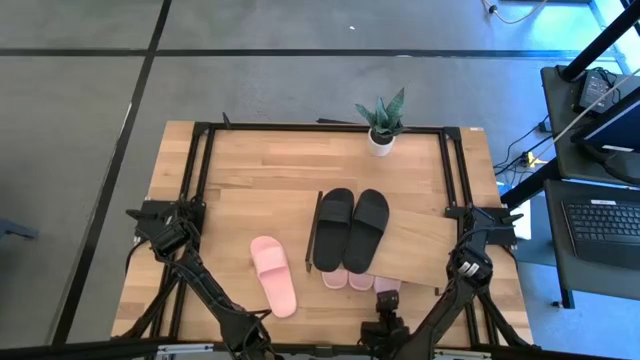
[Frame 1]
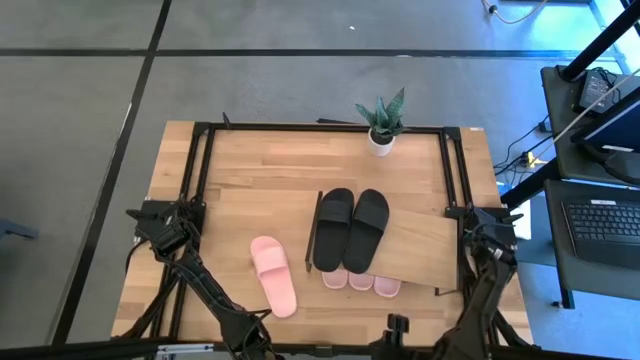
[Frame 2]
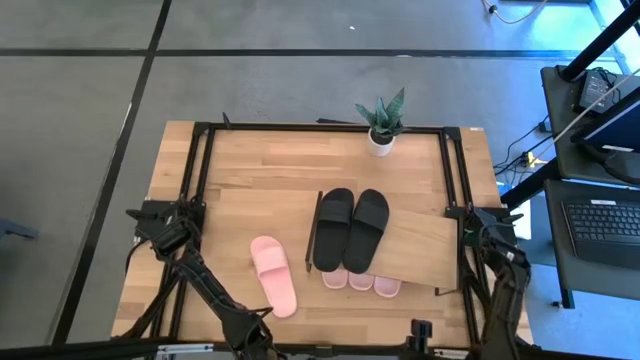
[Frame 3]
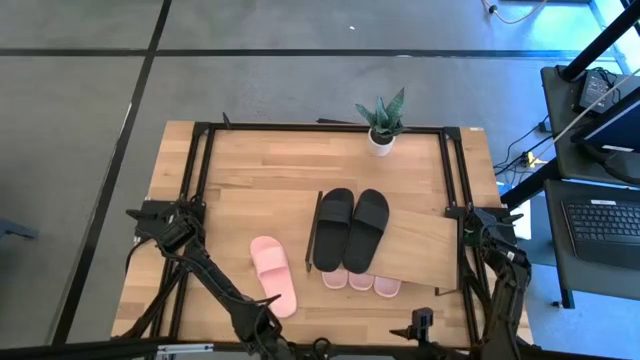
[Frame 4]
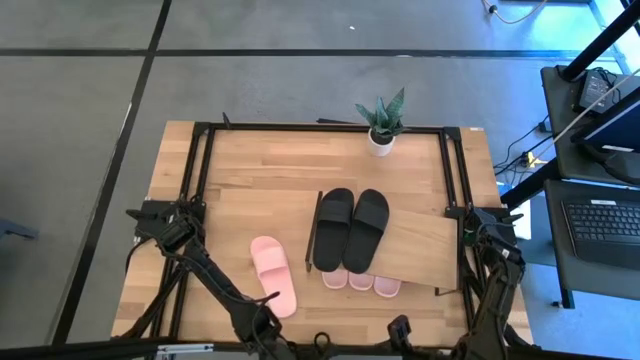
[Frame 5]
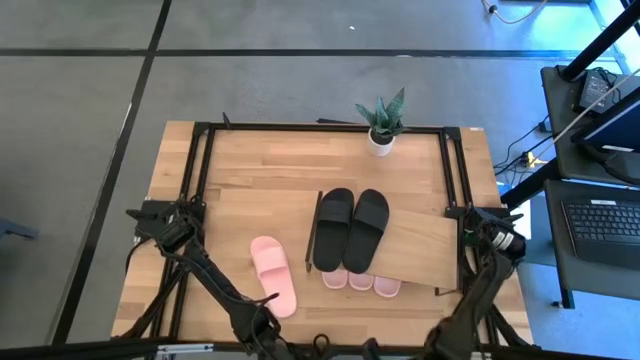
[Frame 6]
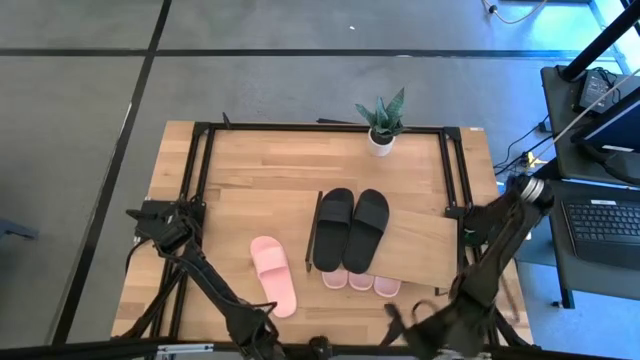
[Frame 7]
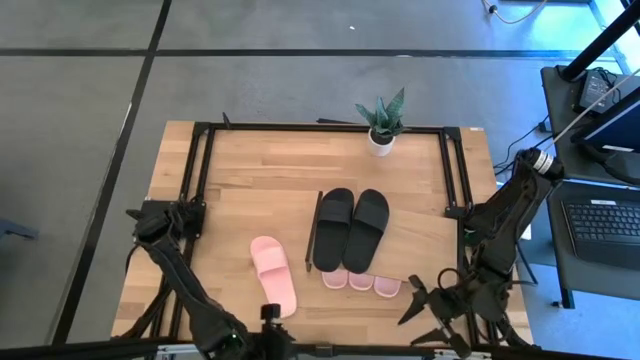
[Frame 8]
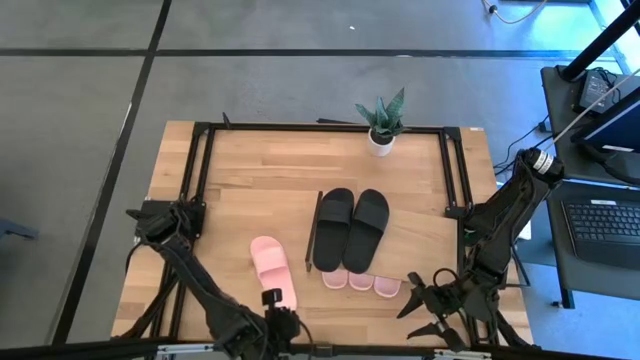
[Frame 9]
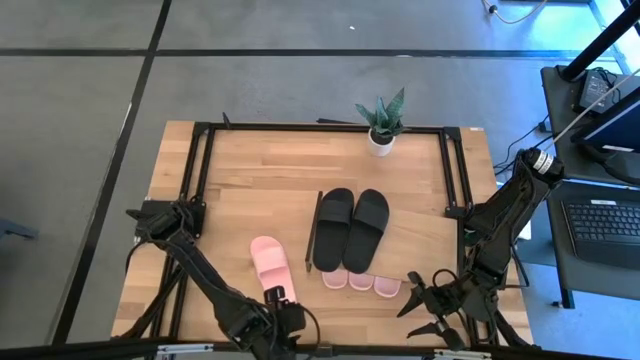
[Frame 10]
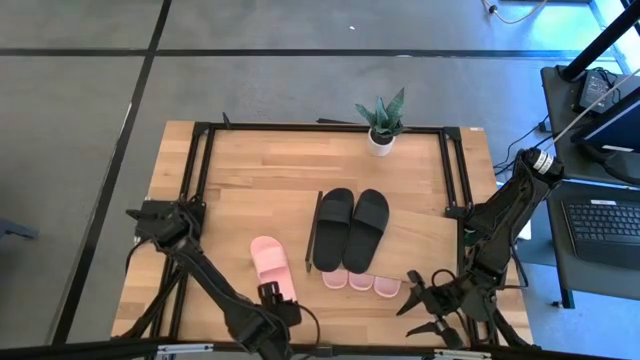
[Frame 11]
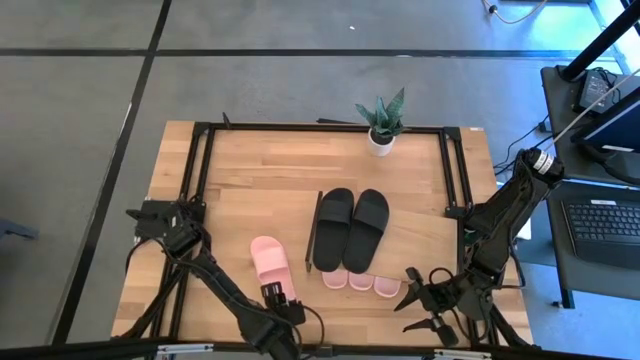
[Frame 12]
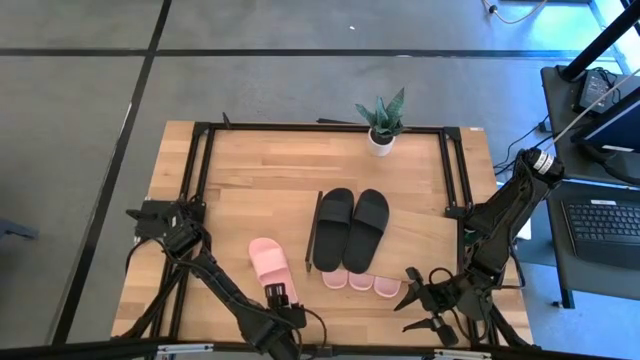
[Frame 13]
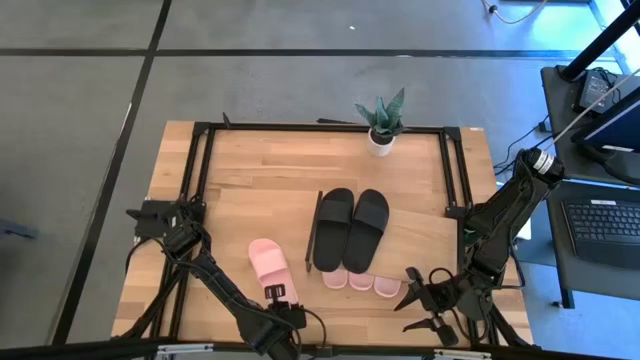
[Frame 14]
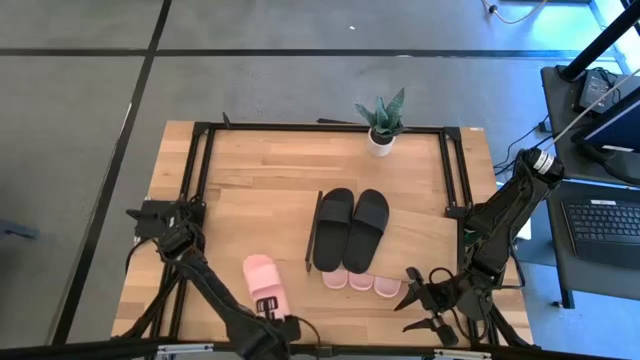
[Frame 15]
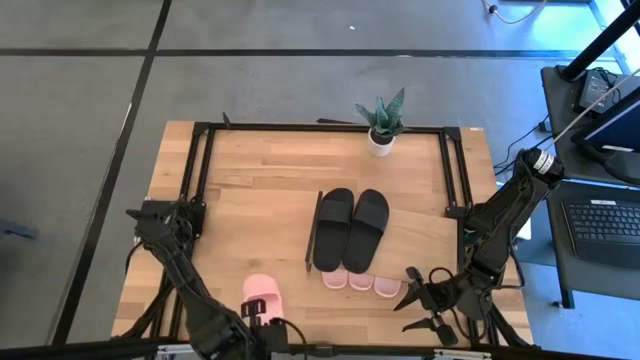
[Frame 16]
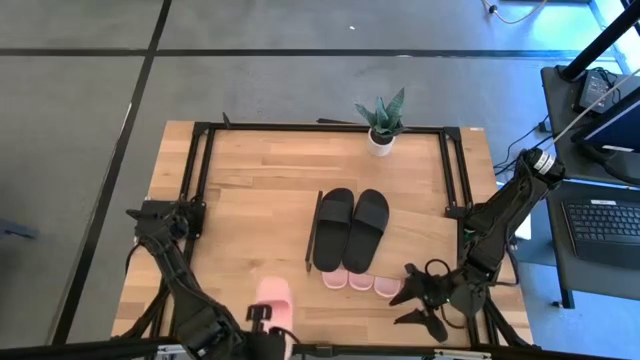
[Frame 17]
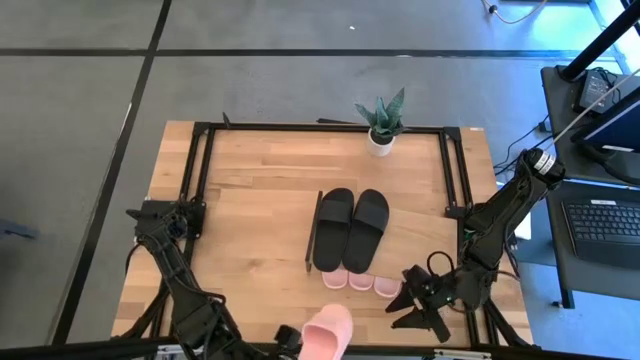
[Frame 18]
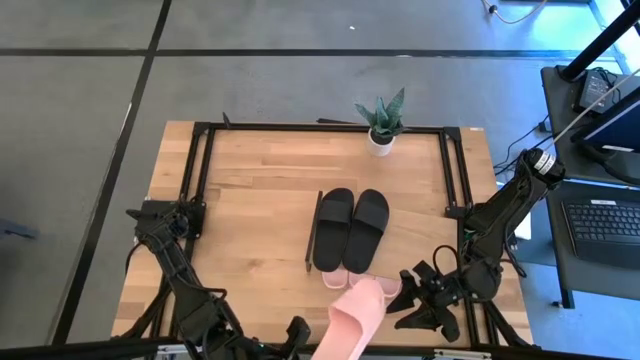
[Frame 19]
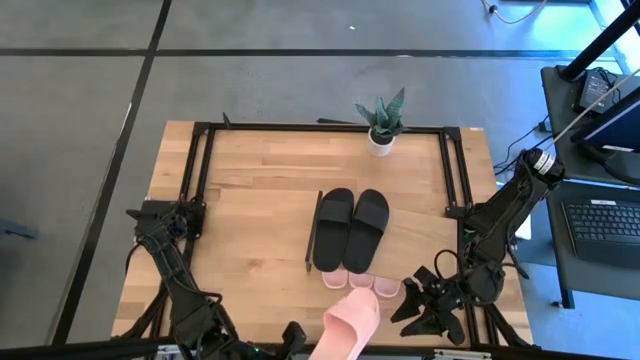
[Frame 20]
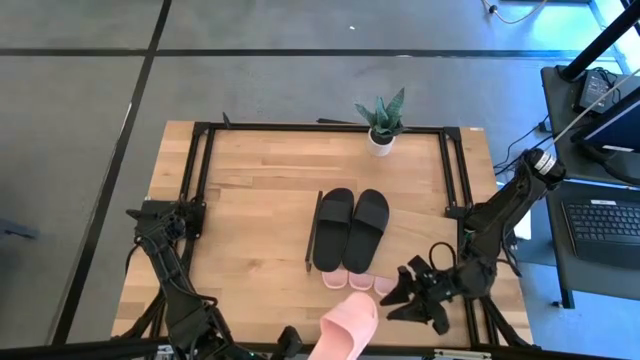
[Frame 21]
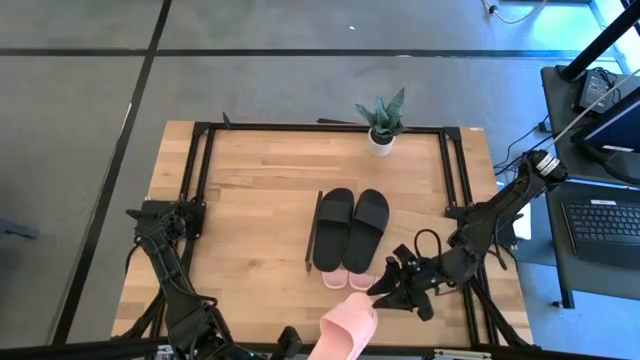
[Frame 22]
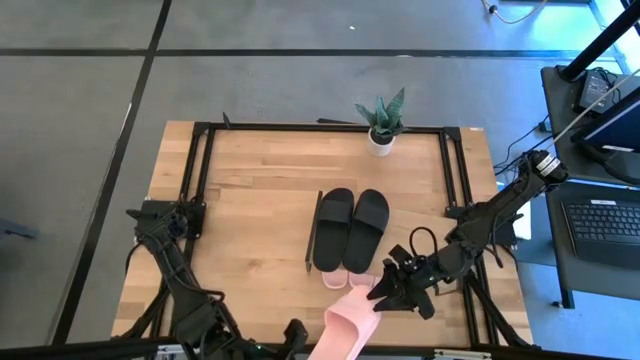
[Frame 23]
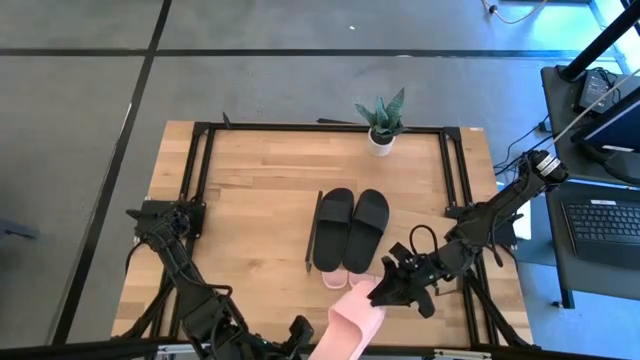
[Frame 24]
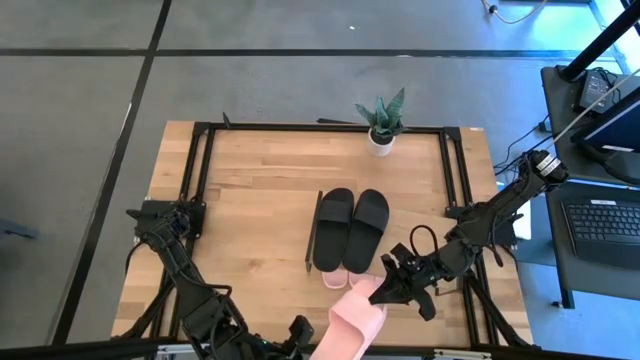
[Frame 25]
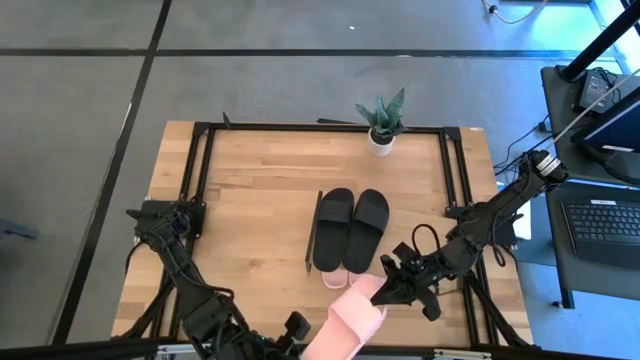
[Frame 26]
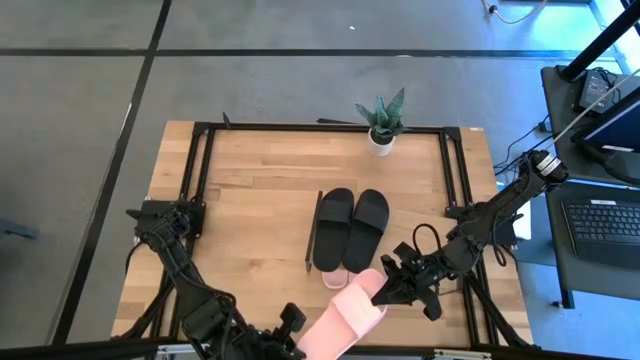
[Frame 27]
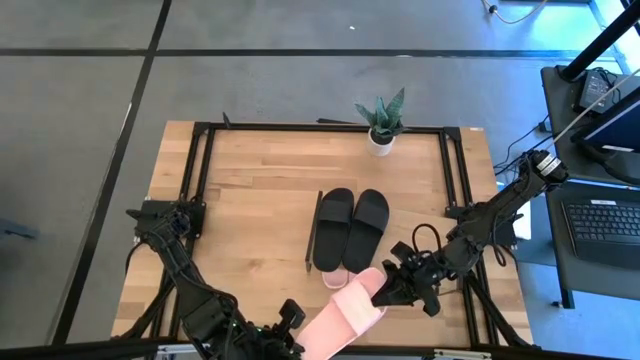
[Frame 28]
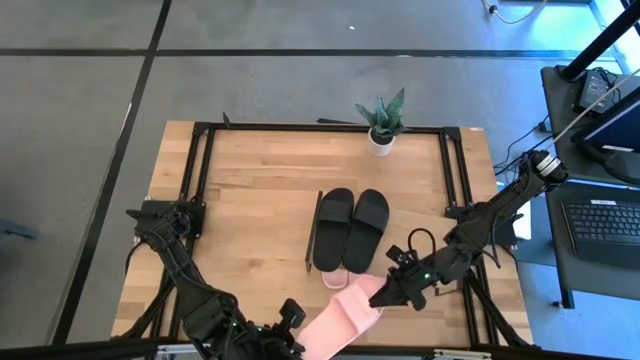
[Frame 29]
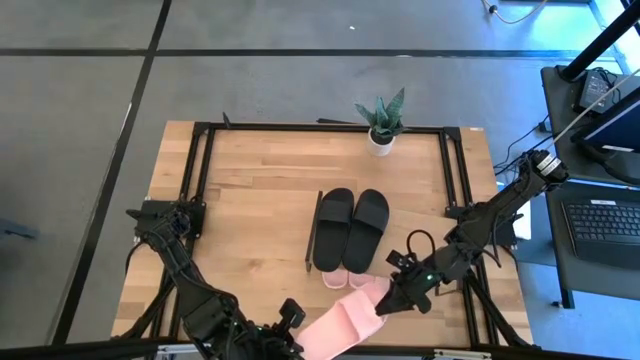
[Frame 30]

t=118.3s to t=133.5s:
Task: Pick and place slides into the shelf
Put the pink slipper under the shelf

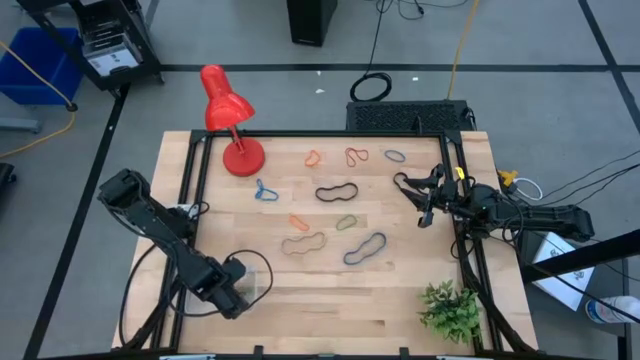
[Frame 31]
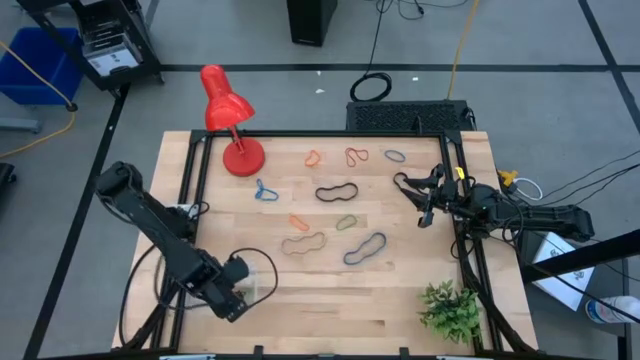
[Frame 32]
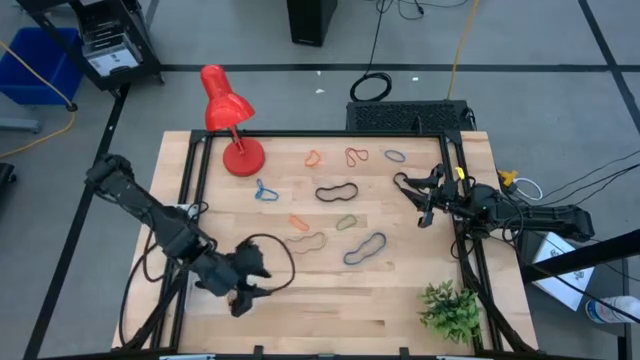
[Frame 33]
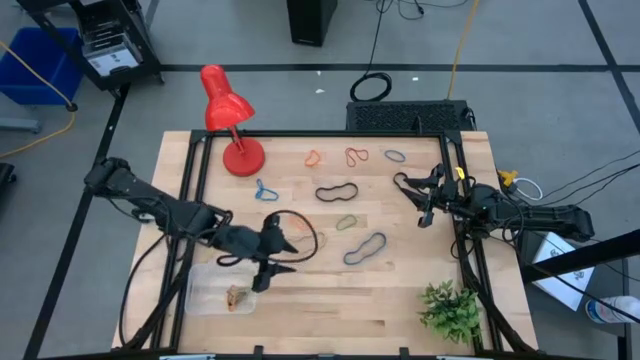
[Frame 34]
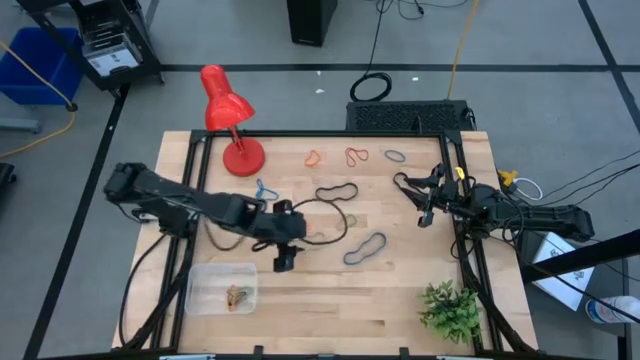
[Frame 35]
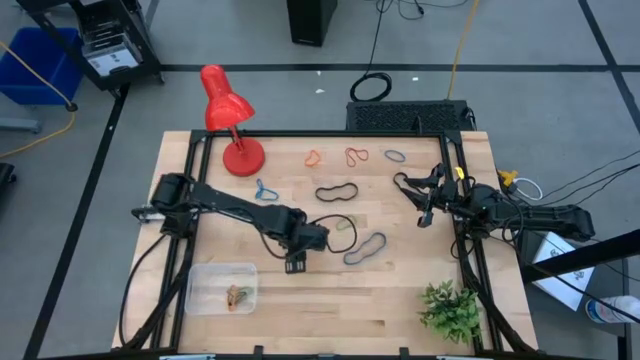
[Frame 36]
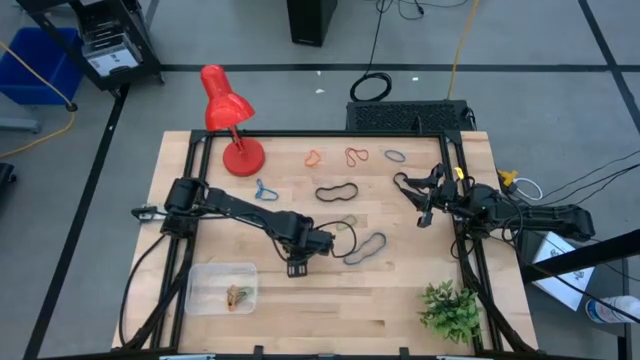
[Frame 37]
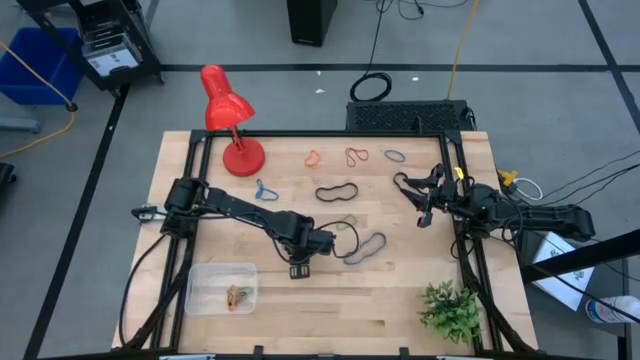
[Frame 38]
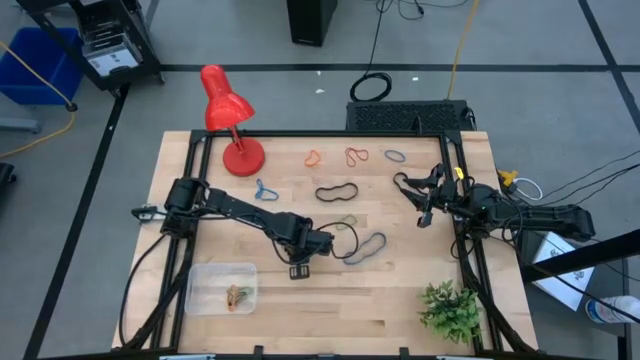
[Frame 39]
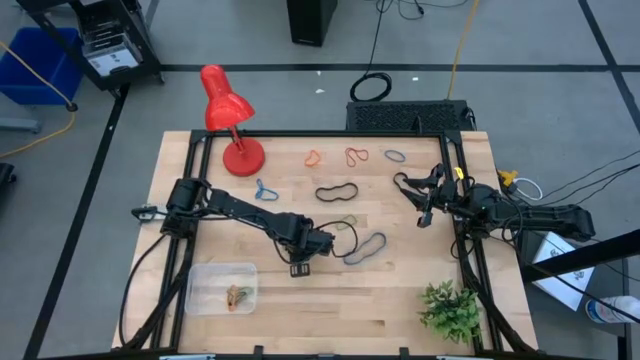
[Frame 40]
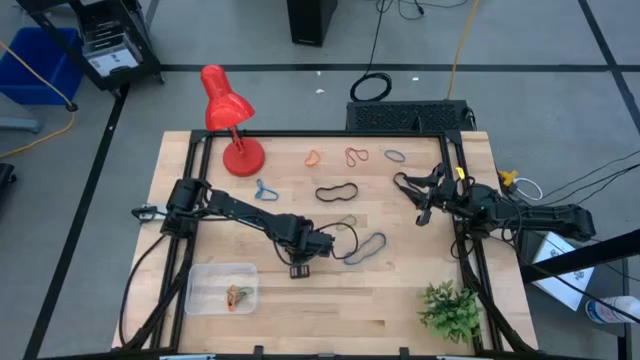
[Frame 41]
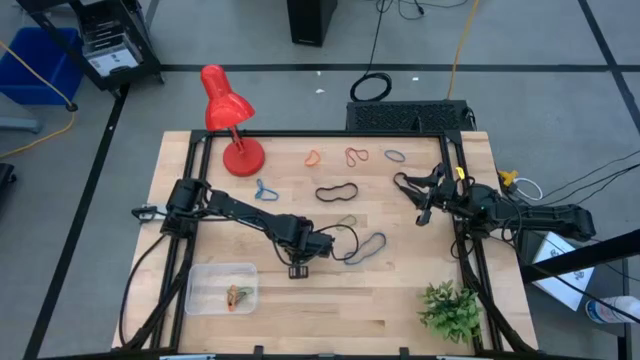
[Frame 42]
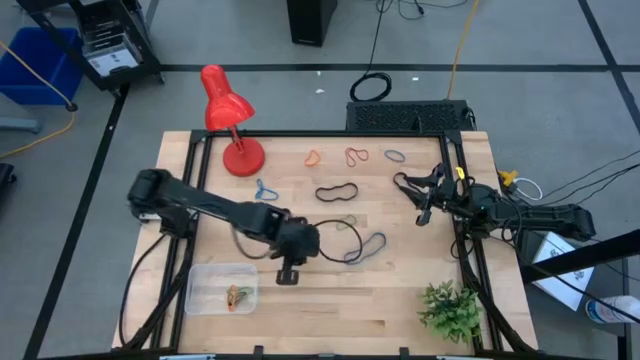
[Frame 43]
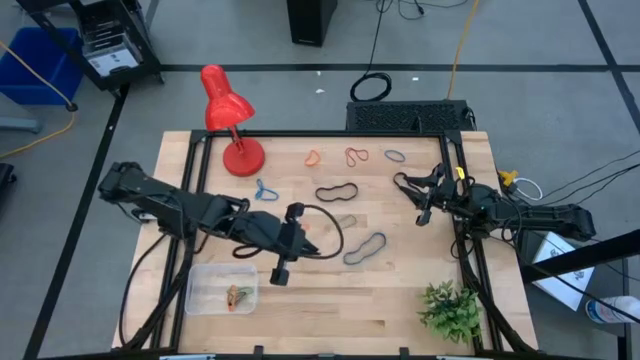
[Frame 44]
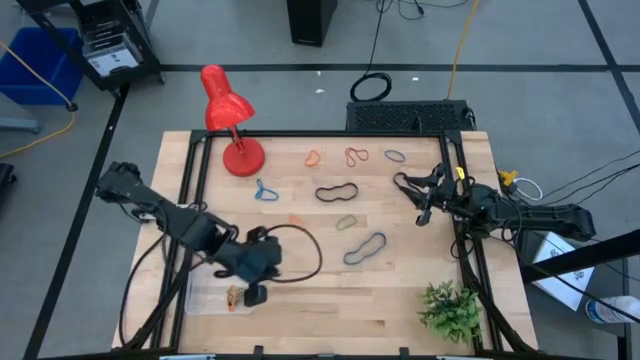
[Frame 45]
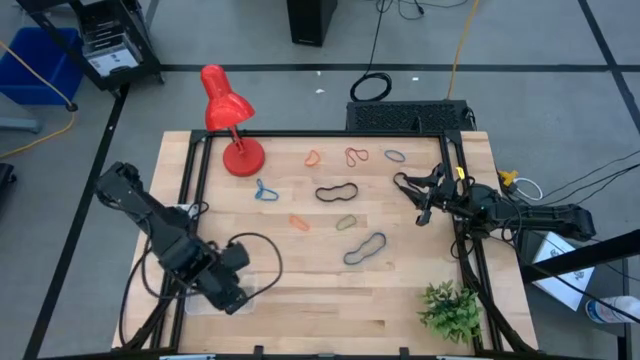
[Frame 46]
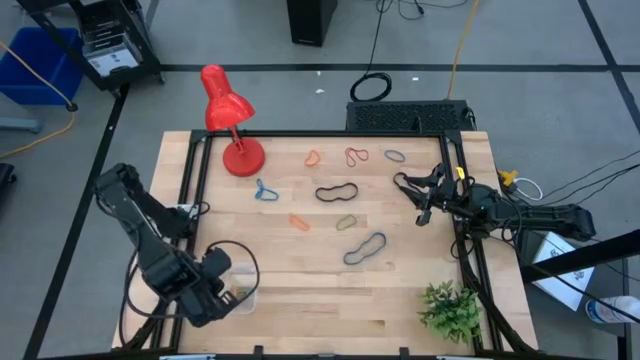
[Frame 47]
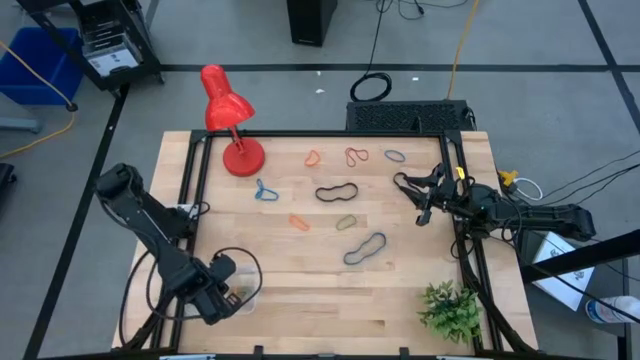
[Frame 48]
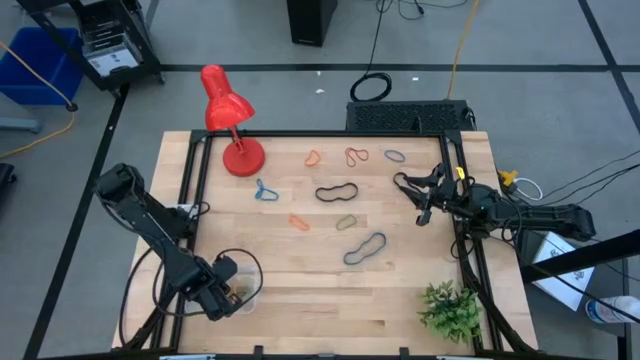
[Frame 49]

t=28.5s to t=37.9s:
Task: Pick and place rubber bands into bin
Put the brown rubber band into the transparent bin
